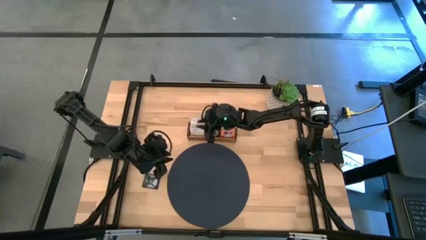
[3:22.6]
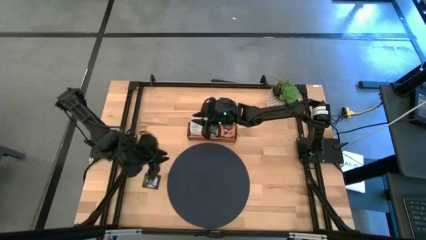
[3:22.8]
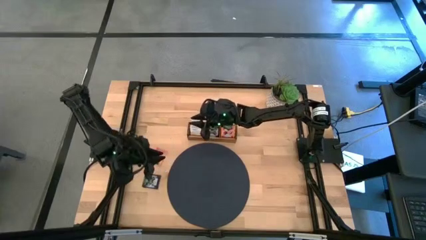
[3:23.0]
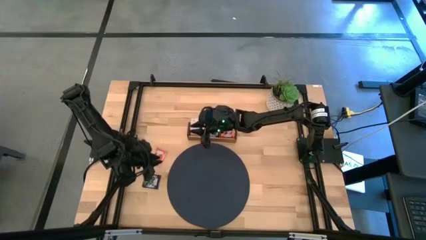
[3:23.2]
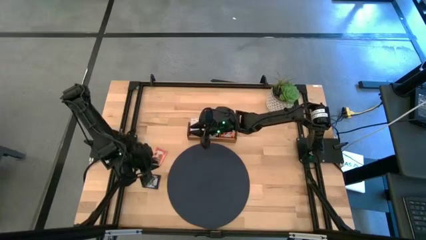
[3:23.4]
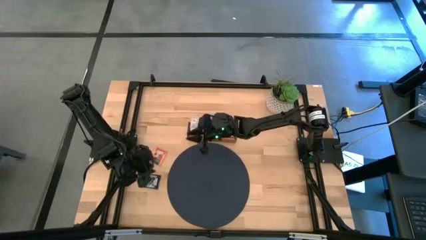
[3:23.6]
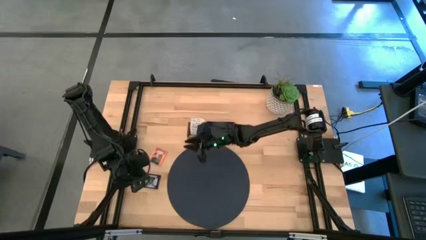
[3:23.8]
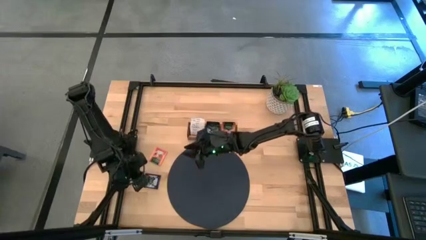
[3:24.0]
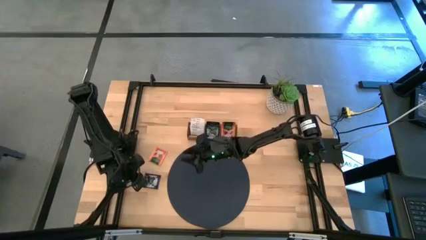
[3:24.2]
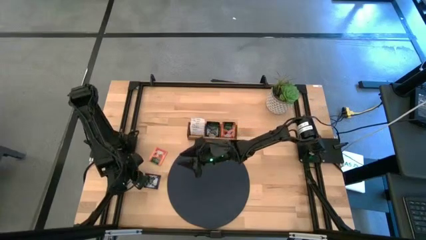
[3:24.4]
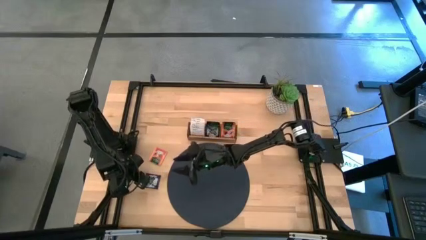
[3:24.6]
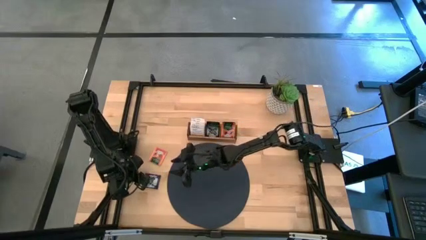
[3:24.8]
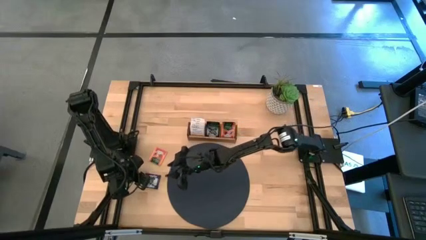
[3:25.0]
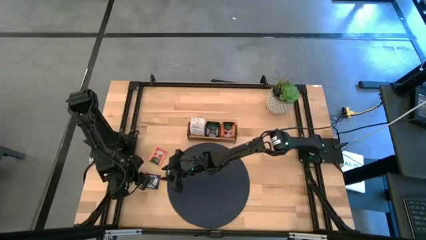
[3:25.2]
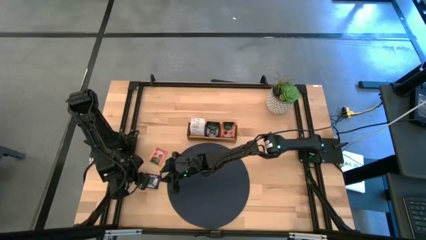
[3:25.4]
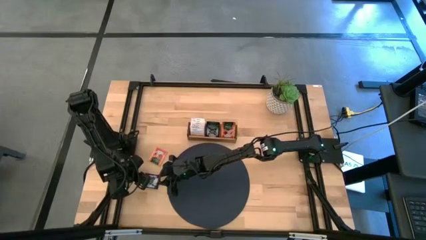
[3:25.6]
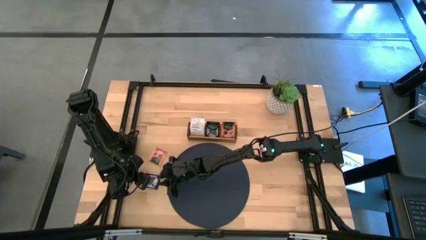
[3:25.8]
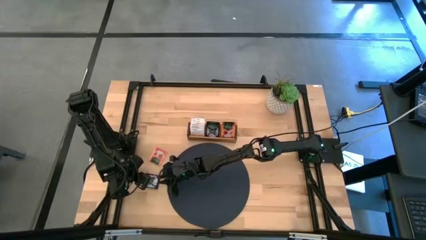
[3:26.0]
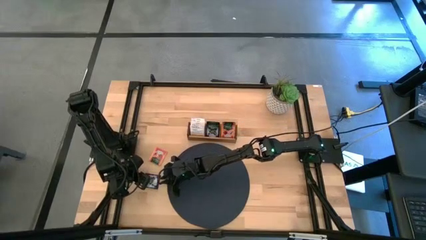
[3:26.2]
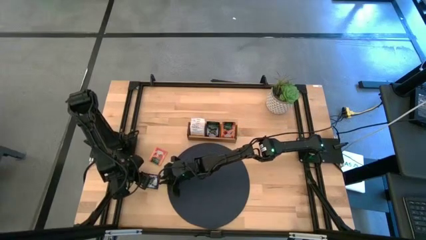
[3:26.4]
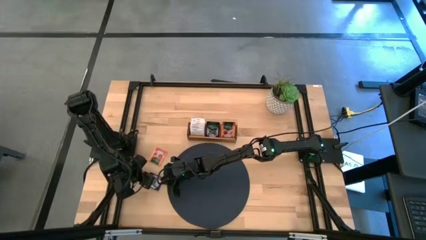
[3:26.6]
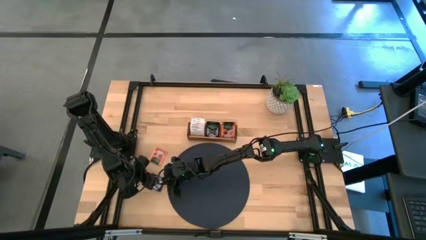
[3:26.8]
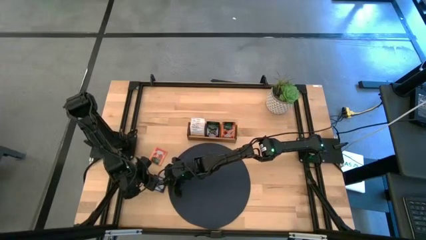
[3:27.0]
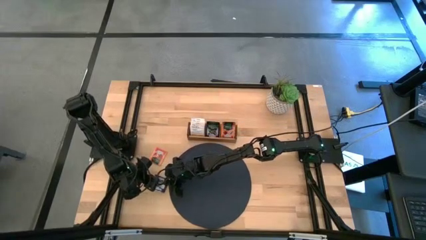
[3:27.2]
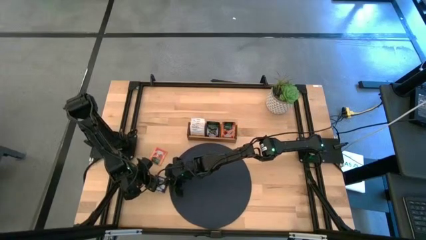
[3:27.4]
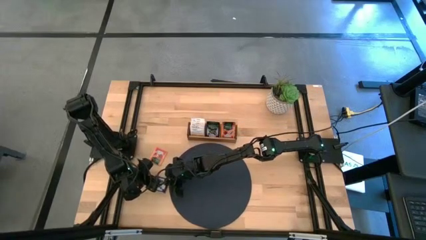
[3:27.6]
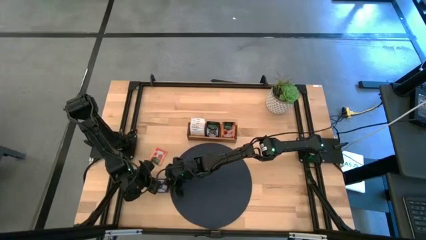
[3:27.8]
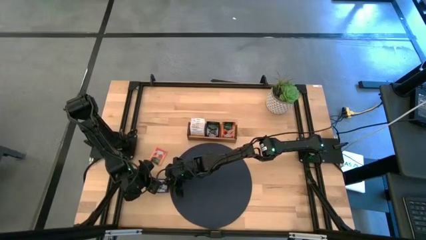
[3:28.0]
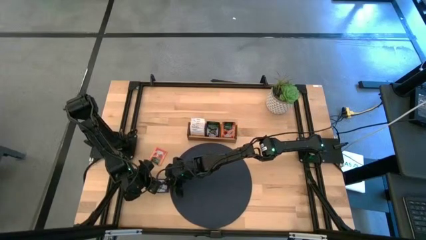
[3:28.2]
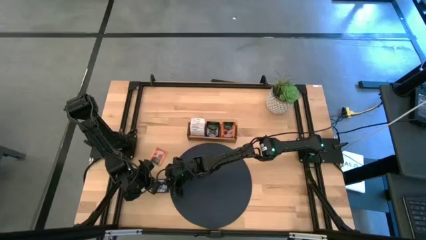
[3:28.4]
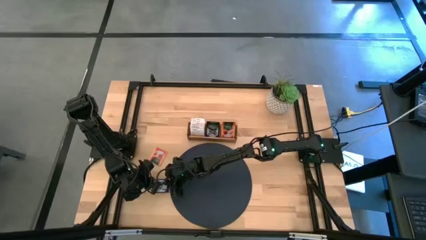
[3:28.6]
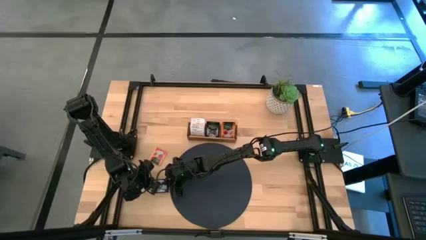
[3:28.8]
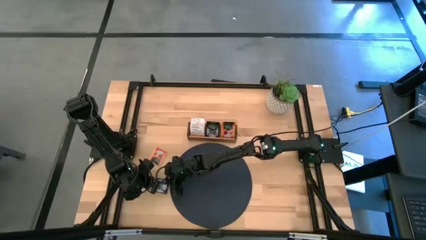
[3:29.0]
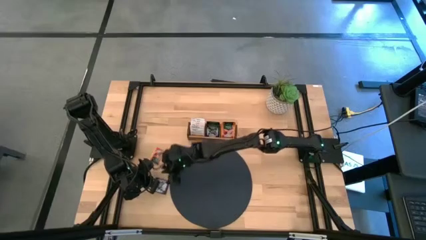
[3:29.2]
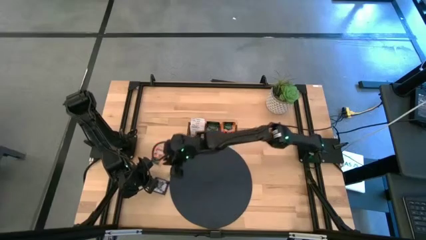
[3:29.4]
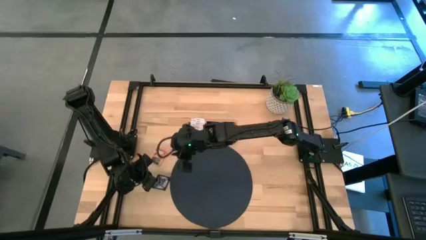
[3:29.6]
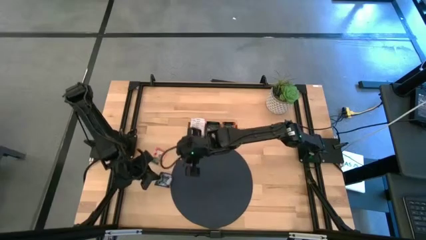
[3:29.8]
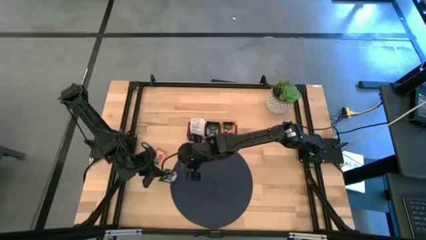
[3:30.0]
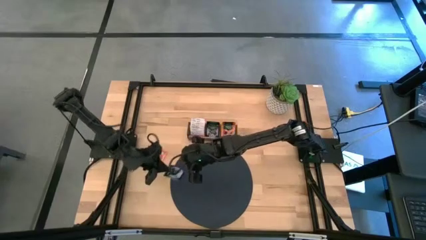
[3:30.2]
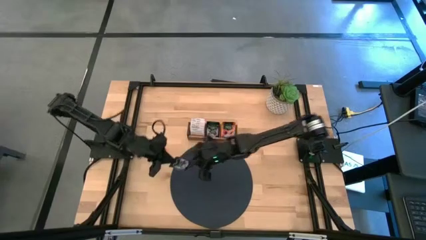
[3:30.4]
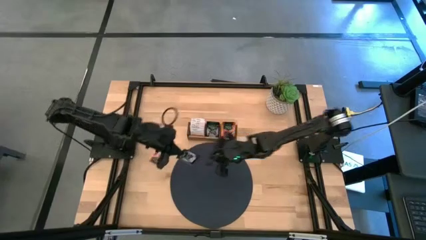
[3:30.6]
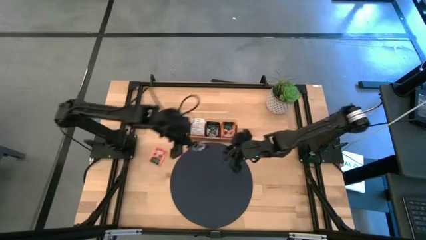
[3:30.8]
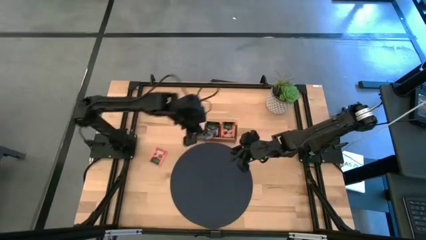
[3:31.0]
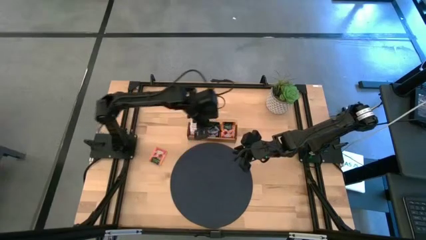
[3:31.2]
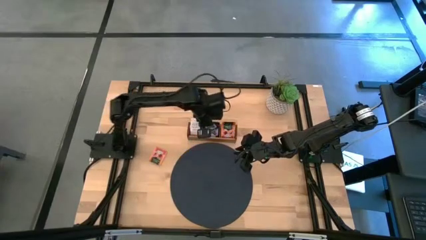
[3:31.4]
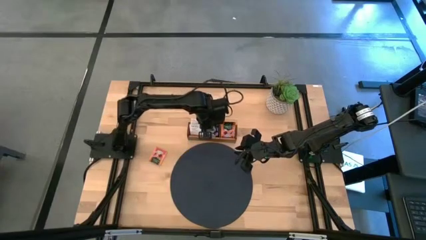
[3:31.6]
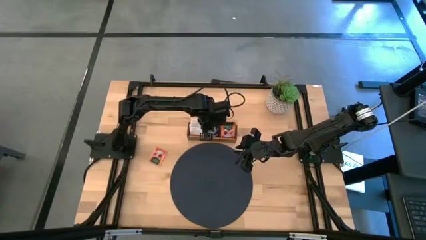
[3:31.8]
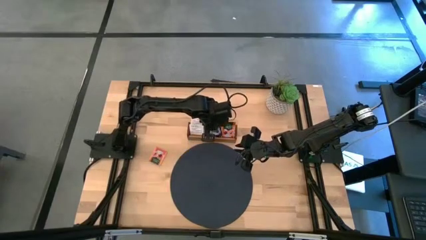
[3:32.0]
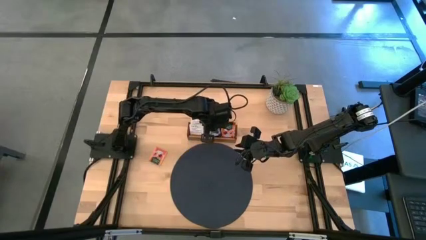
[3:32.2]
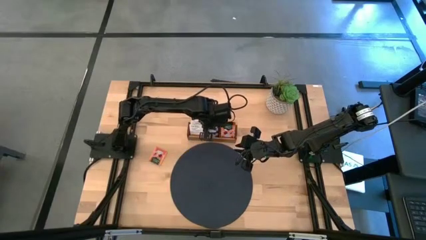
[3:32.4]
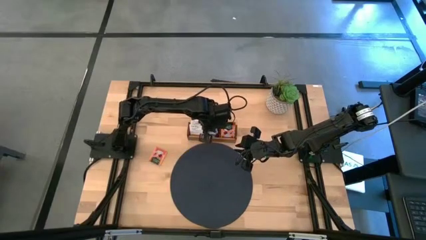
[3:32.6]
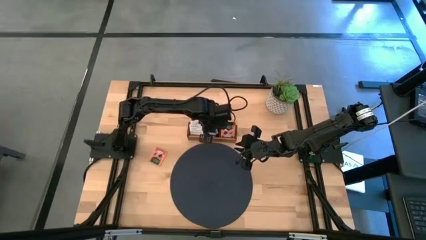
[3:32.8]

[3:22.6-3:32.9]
Task: Pick & Place Tea
Put the violet tea bag into the middle of the wooden organizer

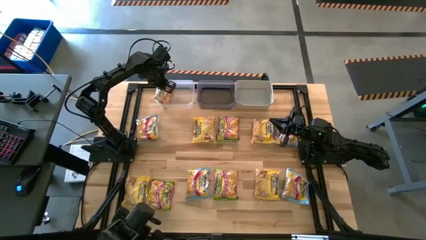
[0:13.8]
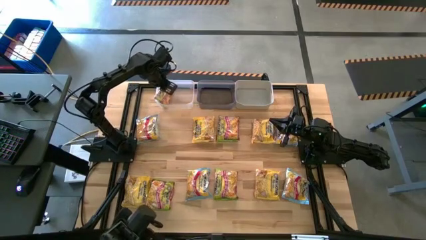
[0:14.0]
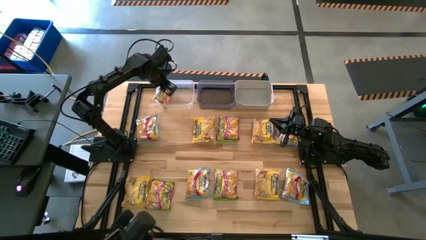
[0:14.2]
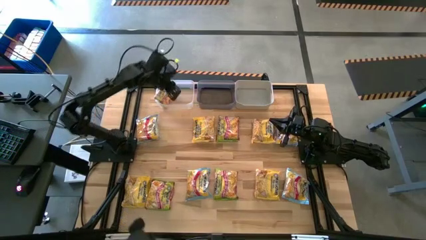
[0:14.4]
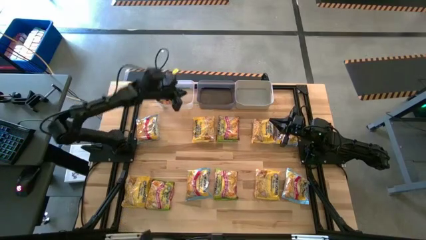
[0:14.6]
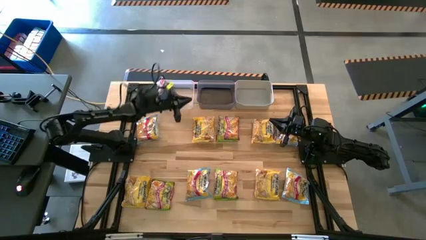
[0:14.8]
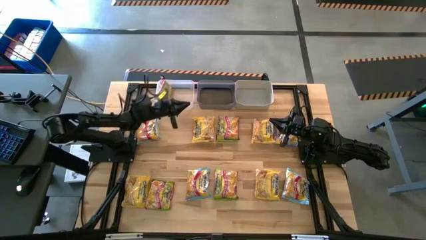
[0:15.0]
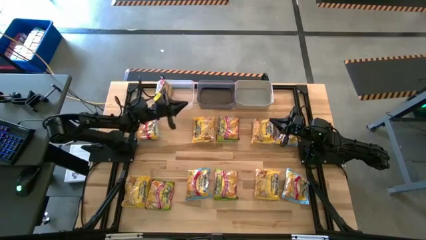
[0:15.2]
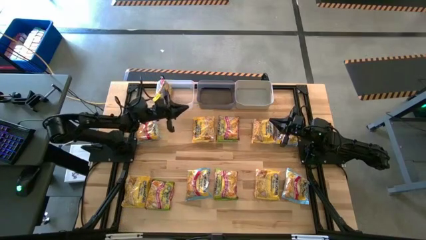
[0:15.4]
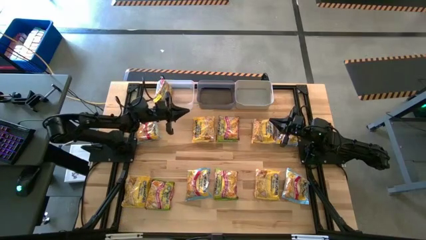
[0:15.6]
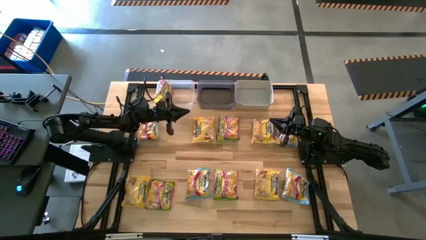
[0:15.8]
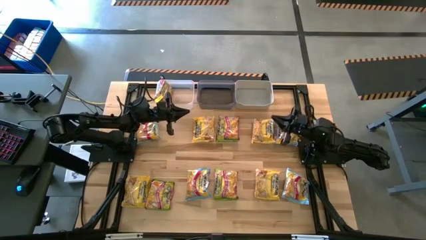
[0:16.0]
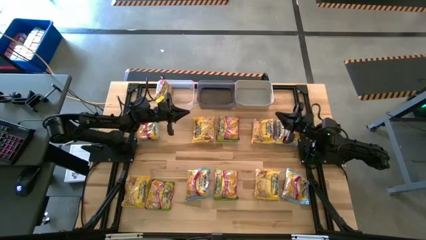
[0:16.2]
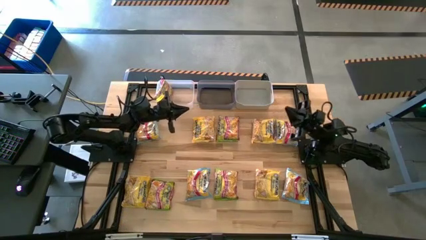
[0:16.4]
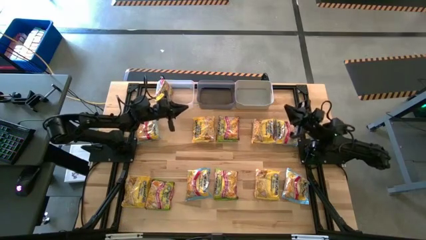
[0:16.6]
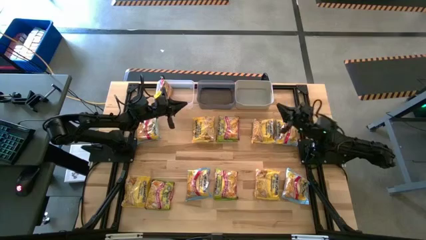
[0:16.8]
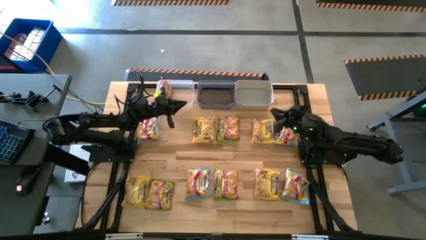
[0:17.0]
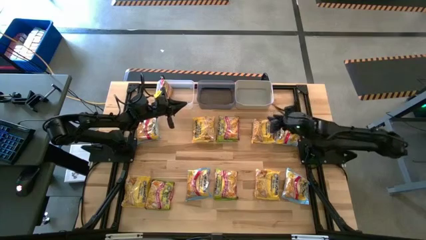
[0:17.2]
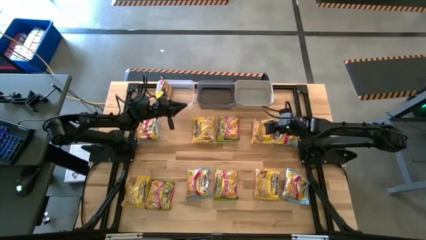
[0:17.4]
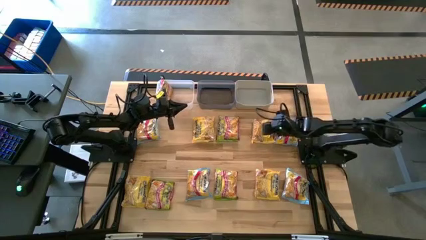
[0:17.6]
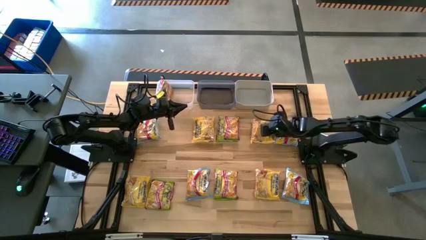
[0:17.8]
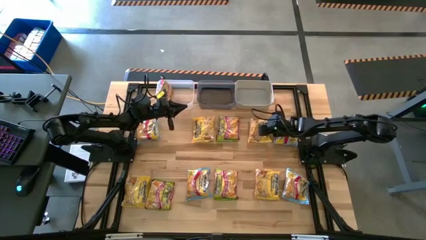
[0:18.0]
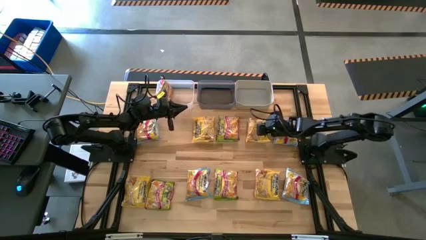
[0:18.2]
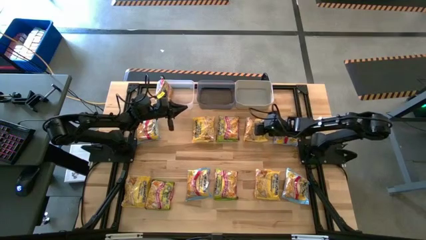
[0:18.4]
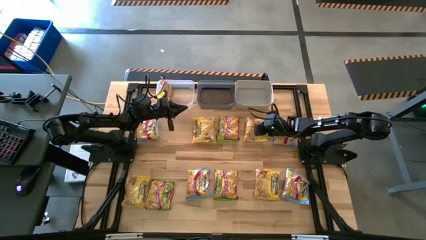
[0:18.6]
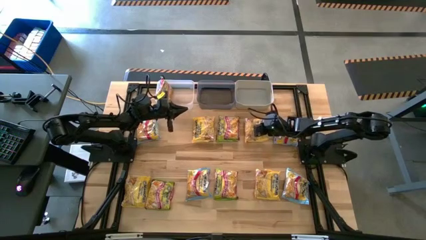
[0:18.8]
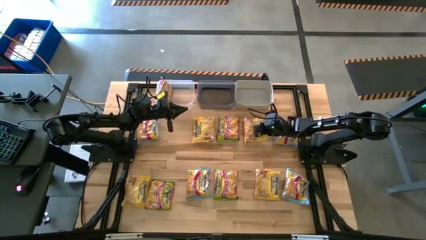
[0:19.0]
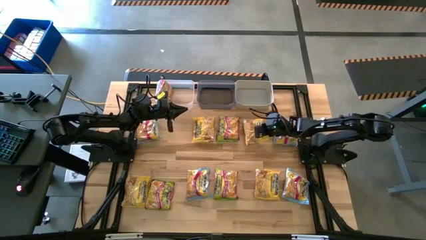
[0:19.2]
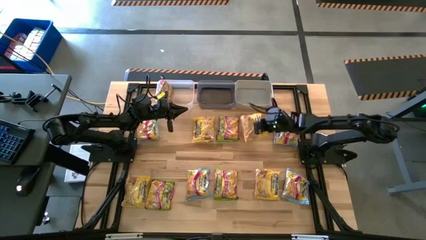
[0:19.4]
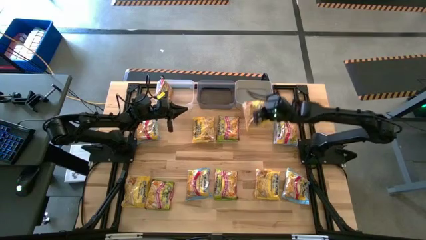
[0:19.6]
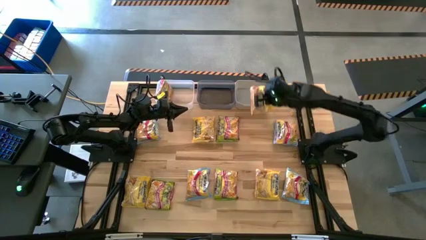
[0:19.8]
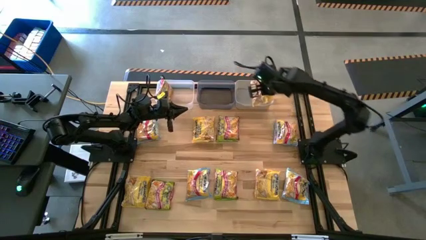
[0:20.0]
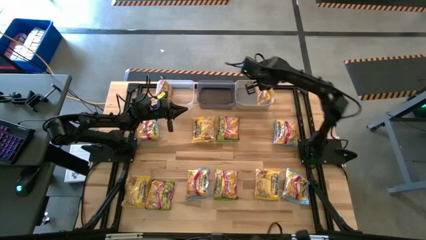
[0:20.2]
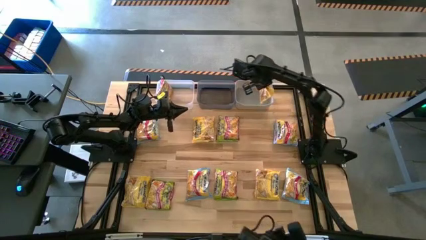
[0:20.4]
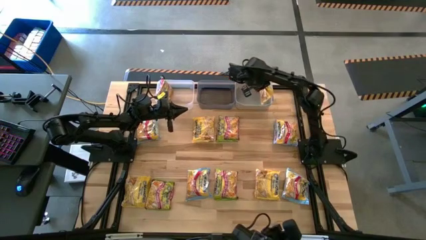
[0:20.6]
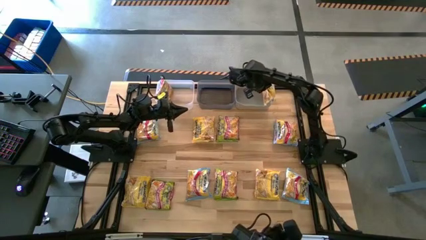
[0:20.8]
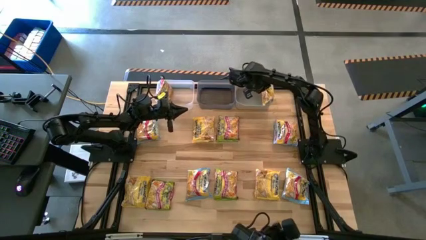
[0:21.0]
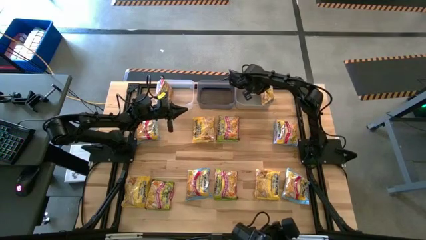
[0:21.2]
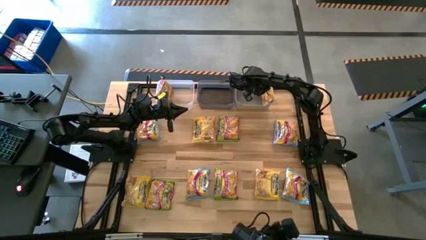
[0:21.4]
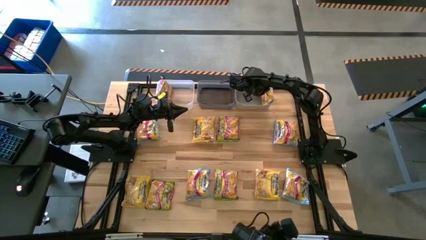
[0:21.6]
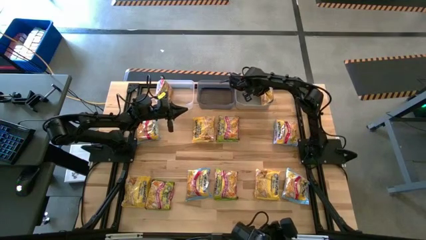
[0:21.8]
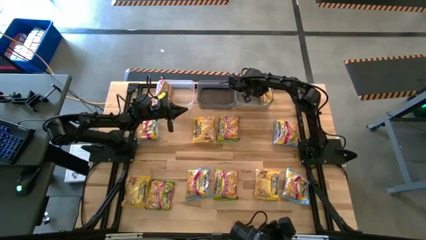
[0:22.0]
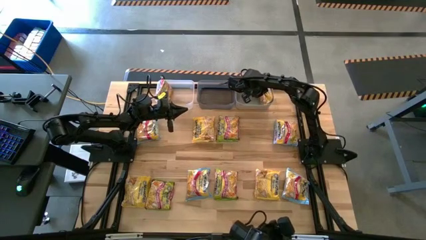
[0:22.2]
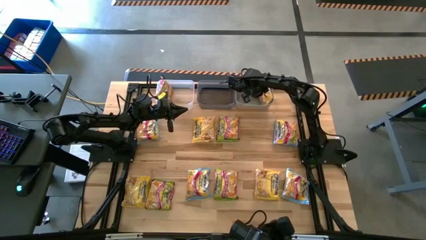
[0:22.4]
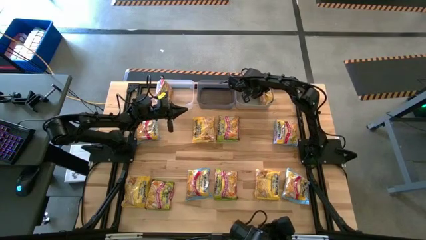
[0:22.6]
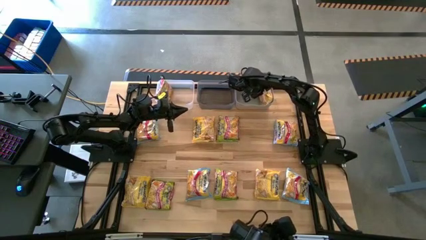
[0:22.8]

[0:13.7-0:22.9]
Task: Sort Maruchan noodles
Put the top right yellow noodle pack into the gray bin
